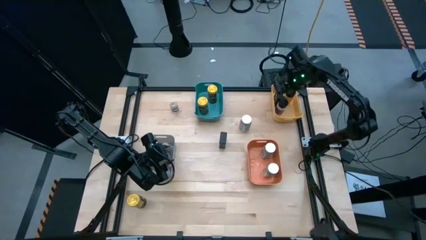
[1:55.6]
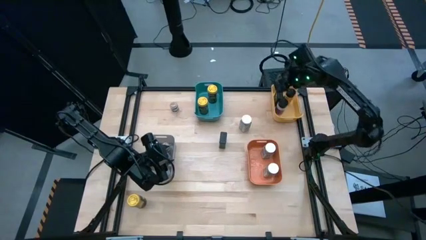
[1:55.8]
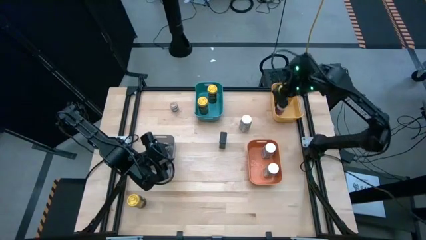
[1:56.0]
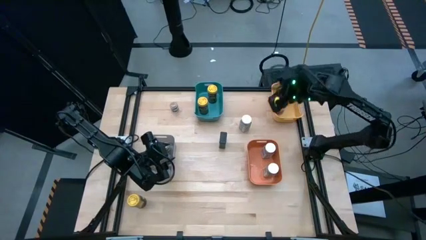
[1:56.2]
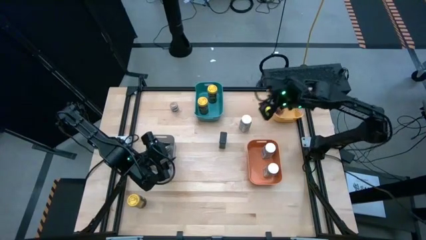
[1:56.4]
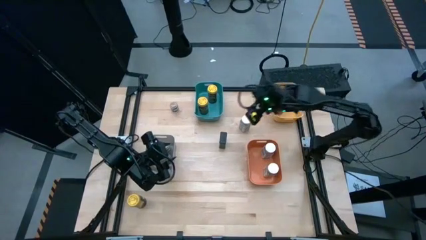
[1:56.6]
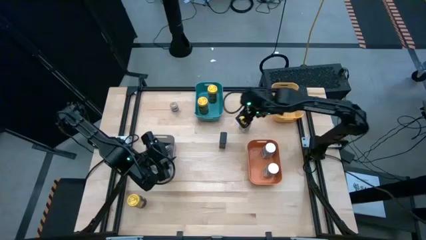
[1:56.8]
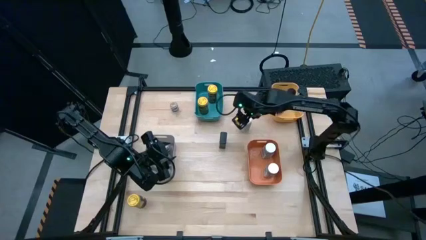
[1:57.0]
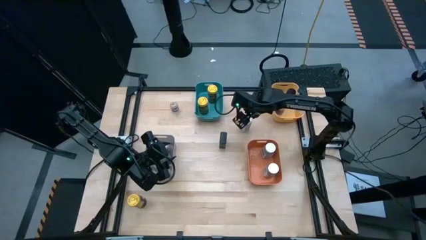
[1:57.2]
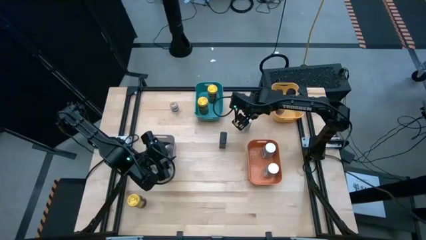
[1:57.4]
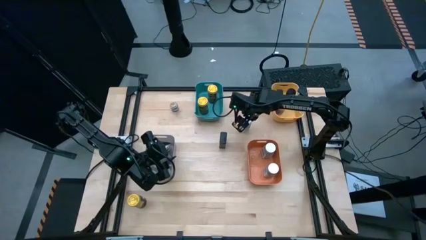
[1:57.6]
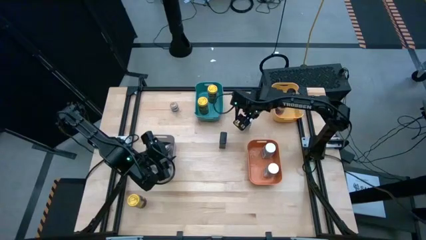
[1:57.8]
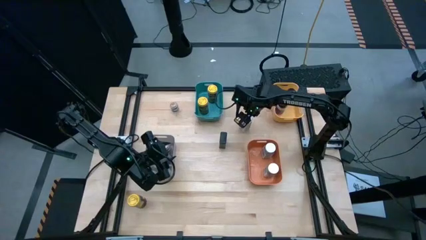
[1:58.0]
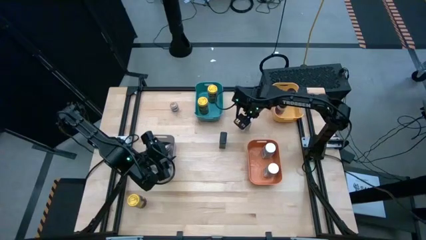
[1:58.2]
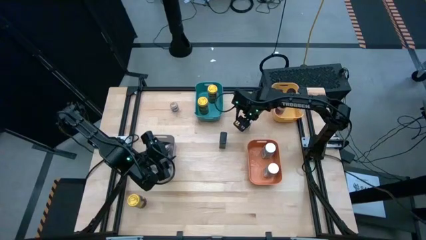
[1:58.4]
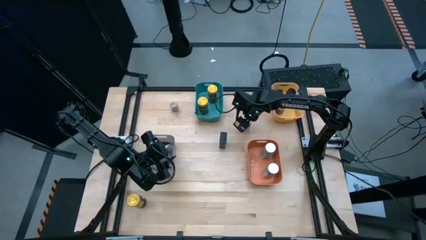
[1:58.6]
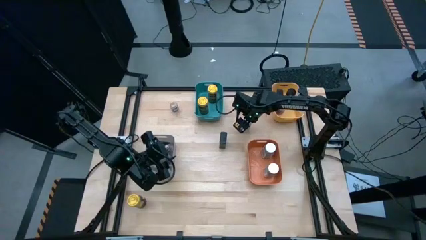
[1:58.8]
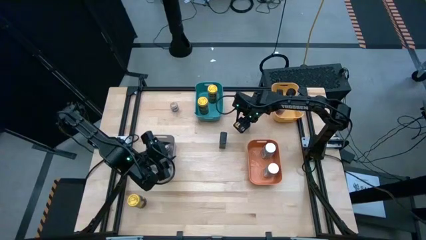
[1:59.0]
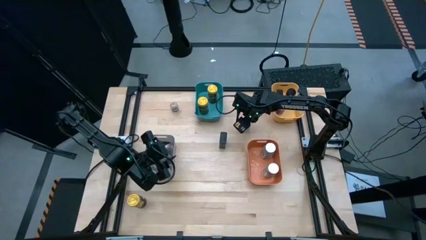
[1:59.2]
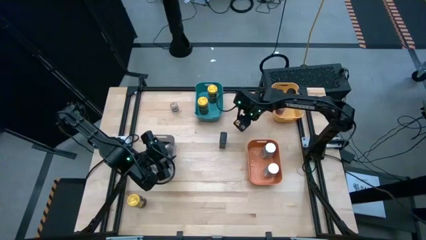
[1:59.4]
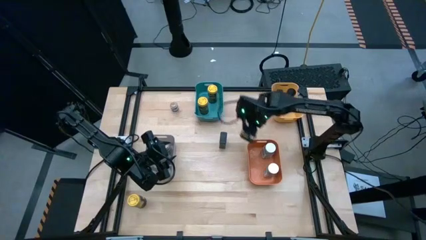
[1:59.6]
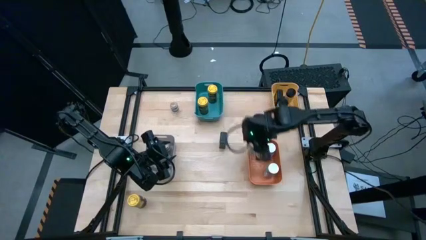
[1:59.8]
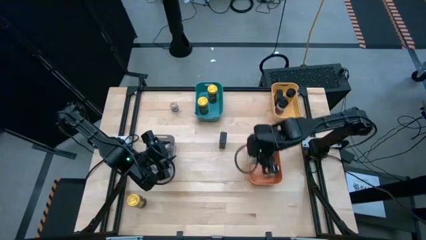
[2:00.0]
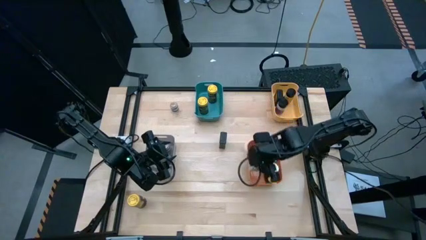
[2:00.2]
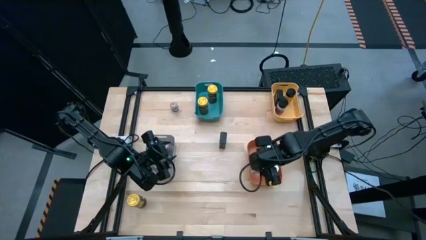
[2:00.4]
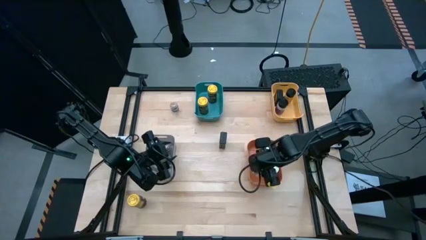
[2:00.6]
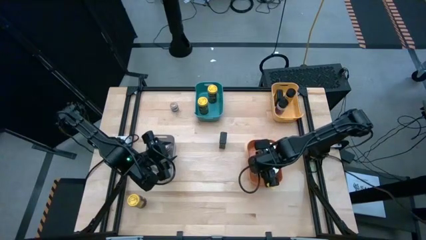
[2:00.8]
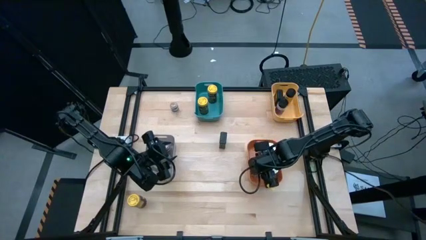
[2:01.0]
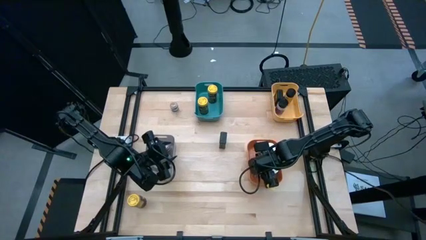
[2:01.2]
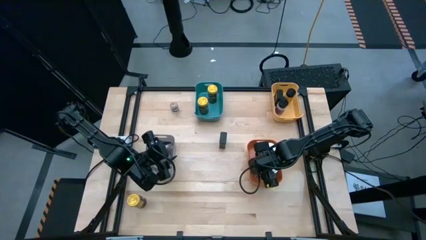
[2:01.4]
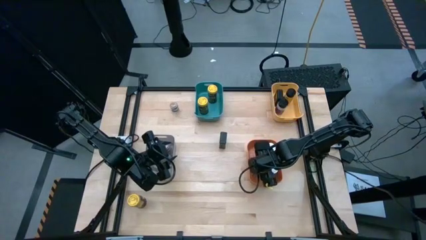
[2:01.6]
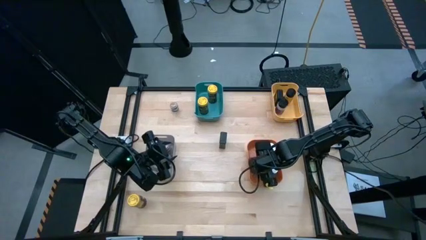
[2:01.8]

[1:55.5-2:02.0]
Task: Sort spices by type
Put the white seasoning bottle into the orange bin

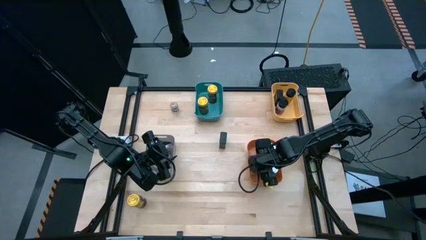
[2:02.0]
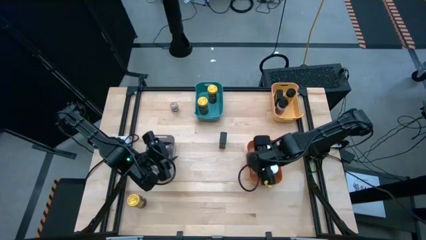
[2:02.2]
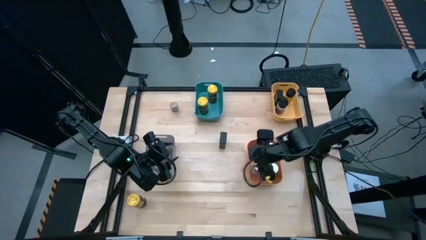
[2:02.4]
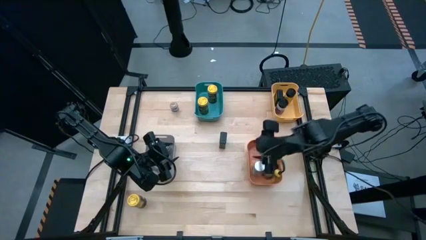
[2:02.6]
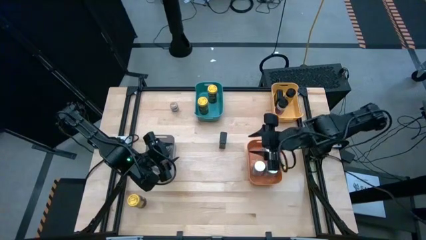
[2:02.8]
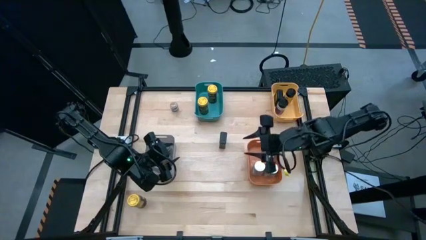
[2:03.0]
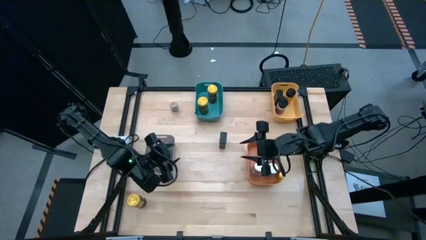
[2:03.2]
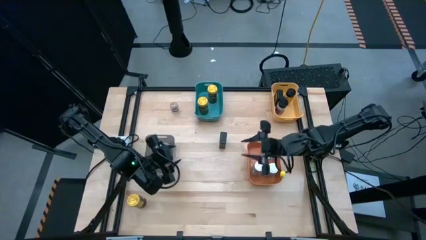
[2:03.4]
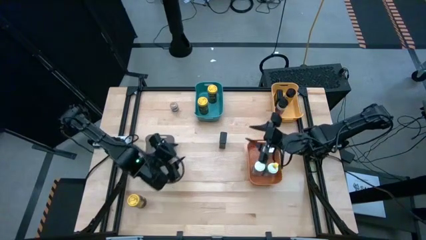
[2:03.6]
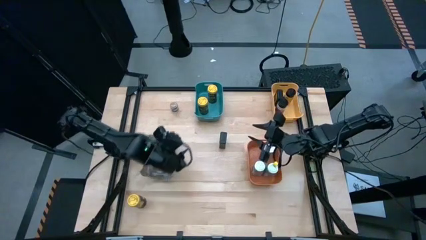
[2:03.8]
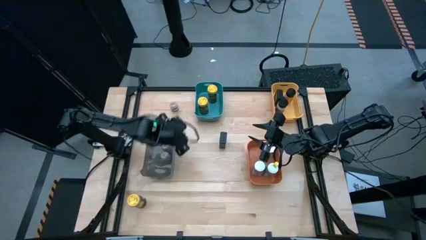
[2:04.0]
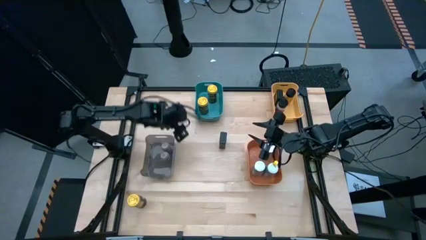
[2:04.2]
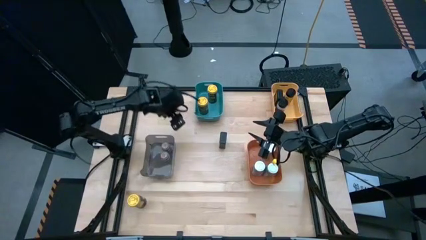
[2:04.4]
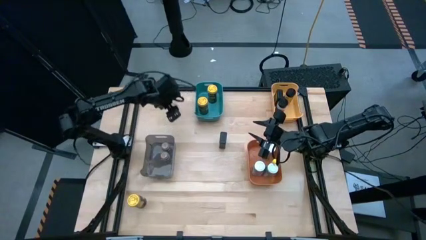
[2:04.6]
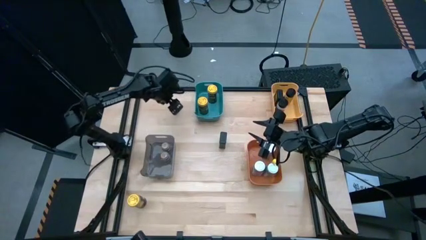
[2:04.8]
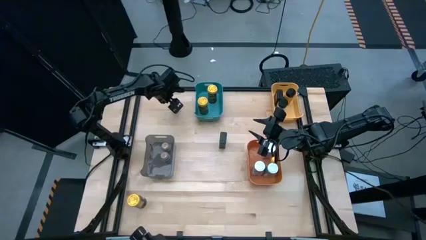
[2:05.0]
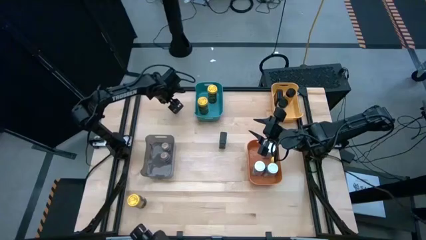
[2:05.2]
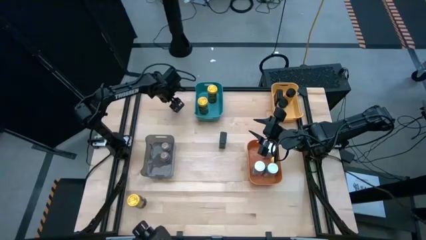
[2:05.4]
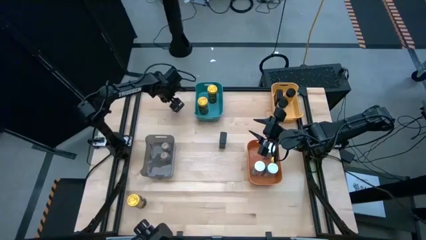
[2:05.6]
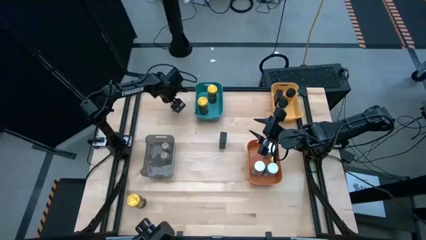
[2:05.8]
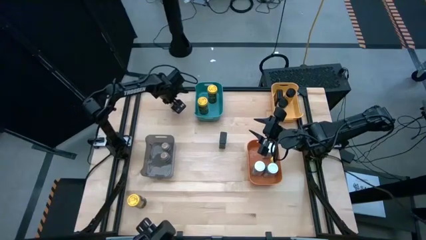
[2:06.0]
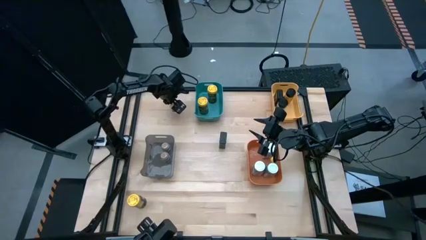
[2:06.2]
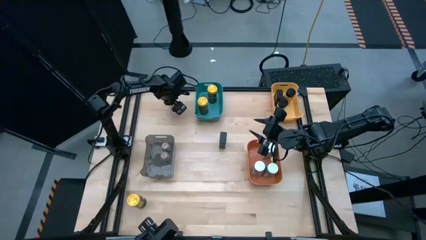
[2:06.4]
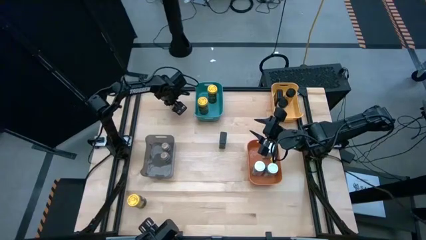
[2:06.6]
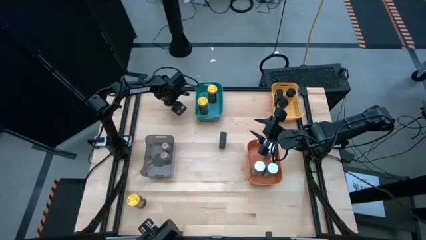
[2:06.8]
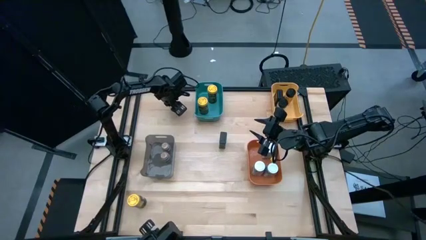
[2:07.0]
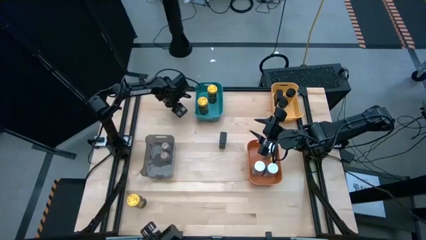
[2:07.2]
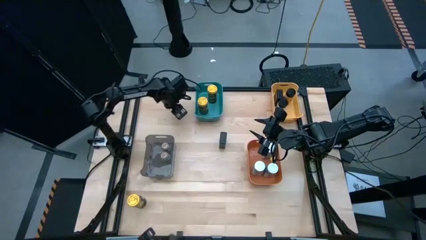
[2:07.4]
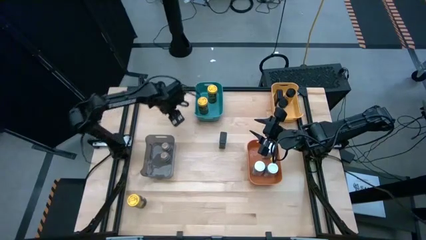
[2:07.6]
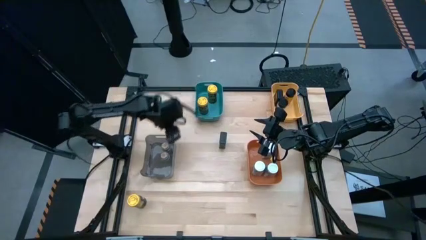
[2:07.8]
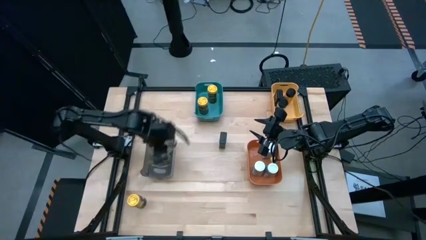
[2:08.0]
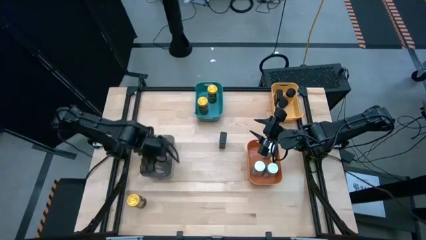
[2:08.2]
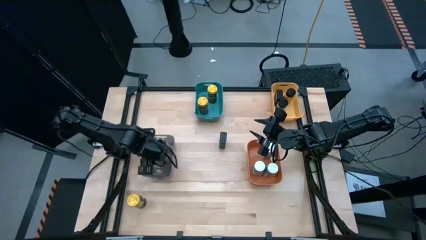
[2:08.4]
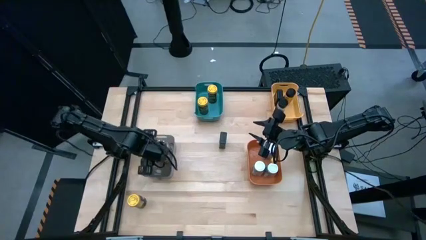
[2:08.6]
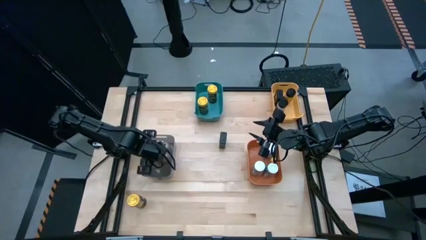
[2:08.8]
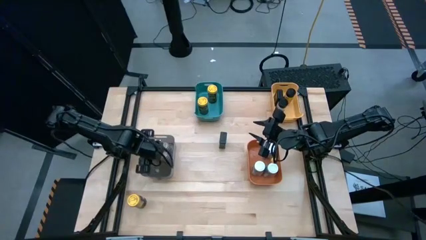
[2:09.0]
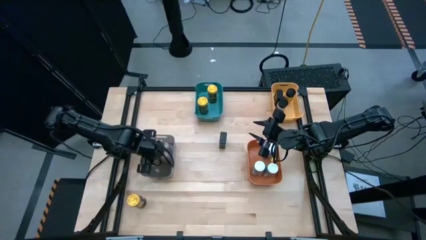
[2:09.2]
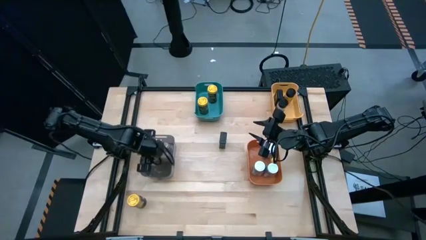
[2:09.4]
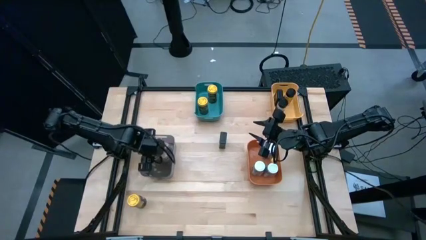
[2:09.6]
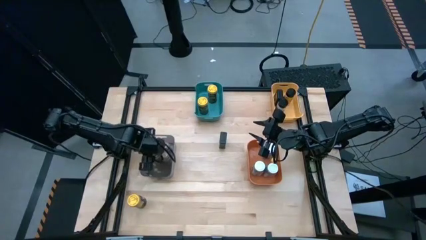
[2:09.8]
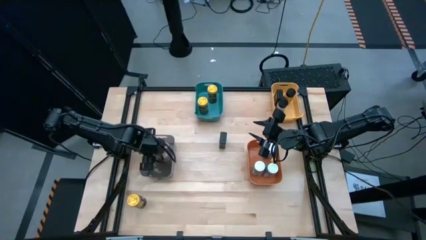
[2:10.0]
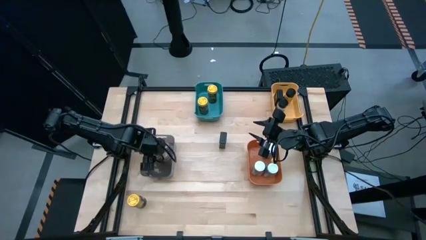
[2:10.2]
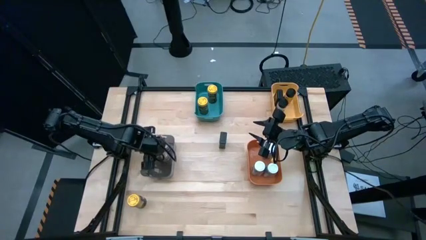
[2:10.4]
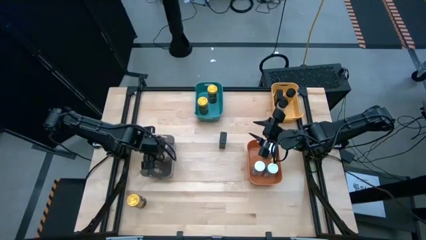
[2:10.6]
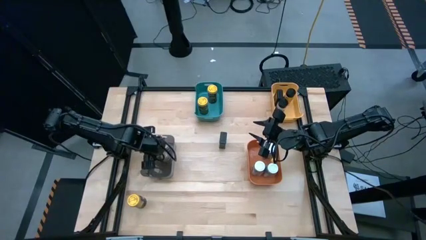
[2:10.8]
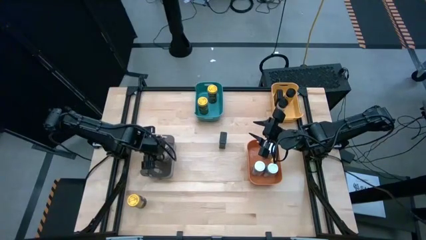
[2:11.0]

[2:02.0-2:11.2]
Put the brown seasoning bottle into the black bin

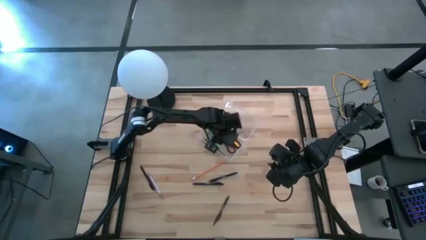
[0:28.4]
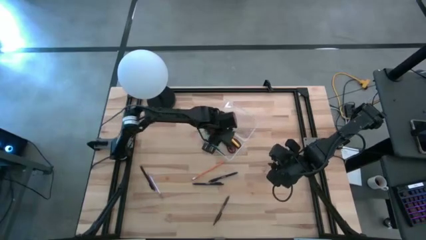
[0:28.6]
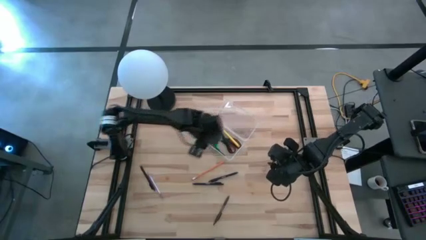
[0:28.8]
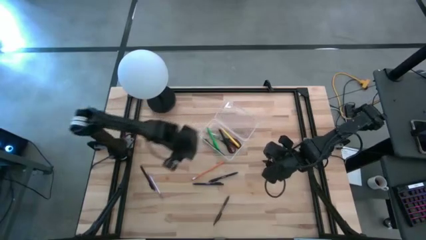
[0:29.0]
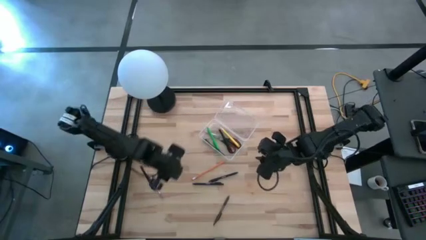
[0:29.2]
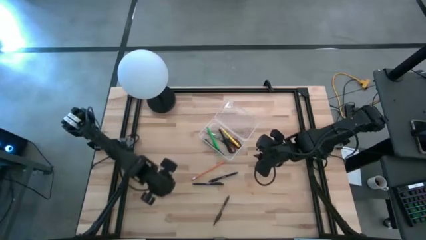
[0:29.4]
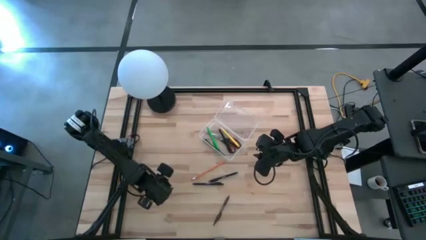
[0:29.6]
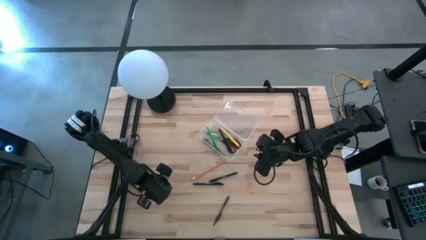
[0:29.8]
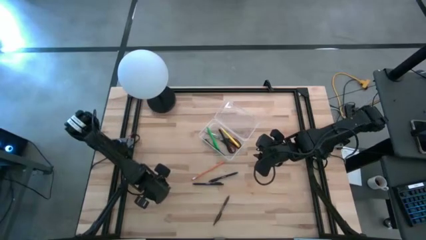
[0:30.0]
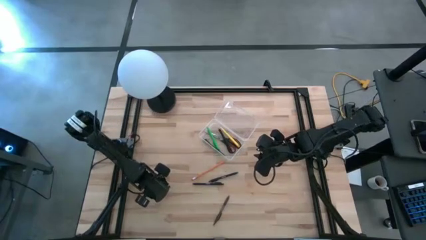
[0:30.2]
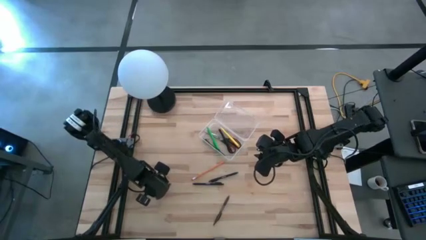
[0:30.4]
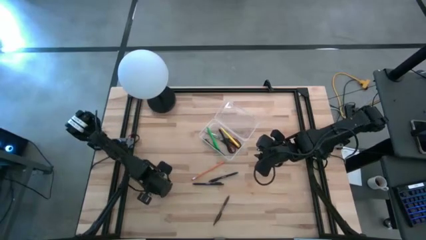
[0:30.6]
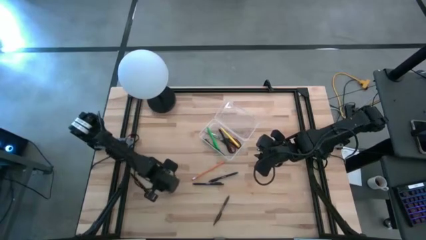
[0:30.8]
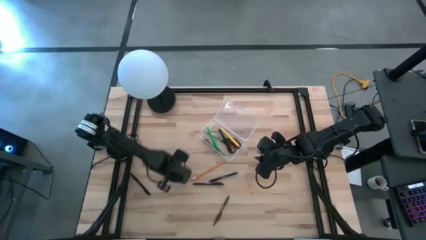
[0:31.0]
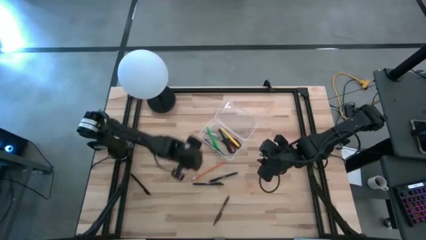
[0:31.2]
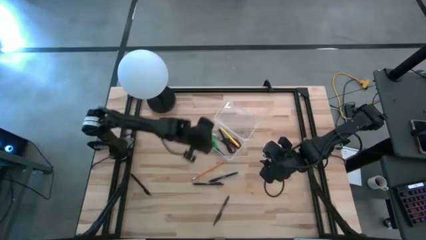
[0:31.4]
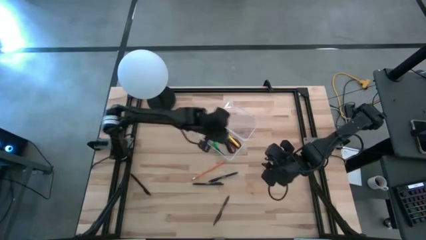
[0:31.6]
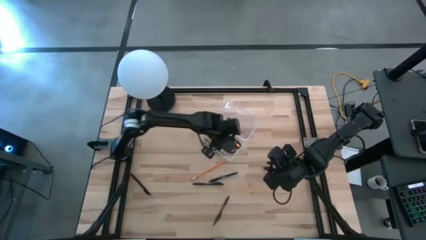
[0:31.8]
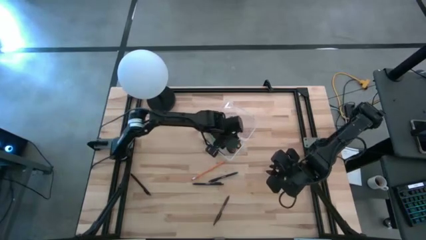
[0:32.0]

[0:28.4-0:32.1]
Task: Pick & place school supplies into a supply box
Put the transparent pen into the transparent supply box
